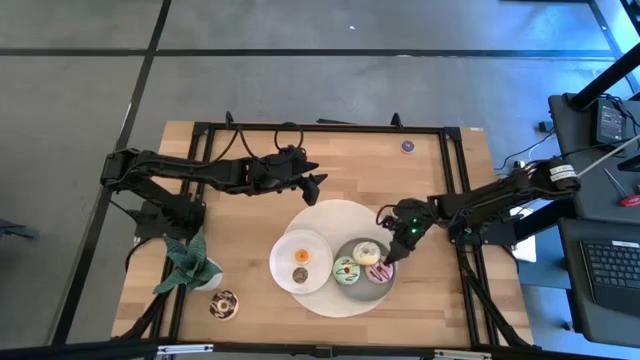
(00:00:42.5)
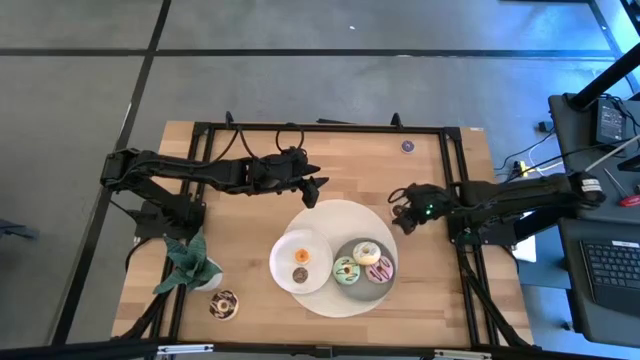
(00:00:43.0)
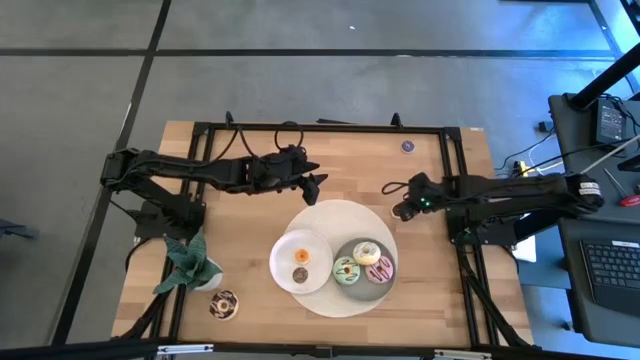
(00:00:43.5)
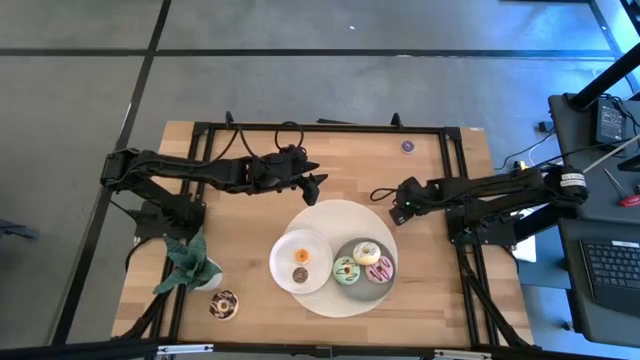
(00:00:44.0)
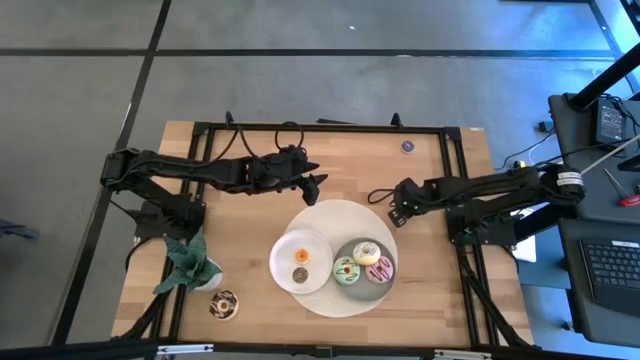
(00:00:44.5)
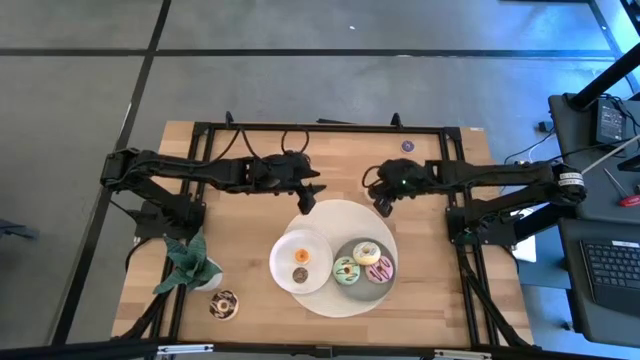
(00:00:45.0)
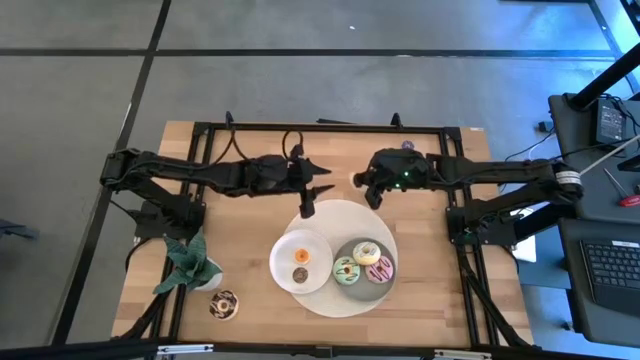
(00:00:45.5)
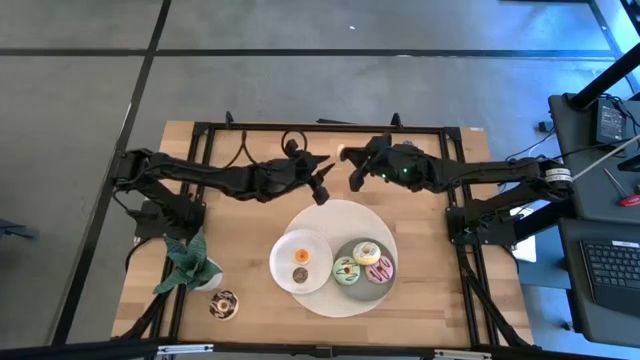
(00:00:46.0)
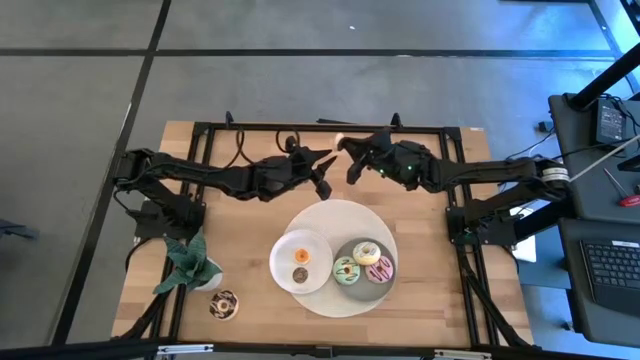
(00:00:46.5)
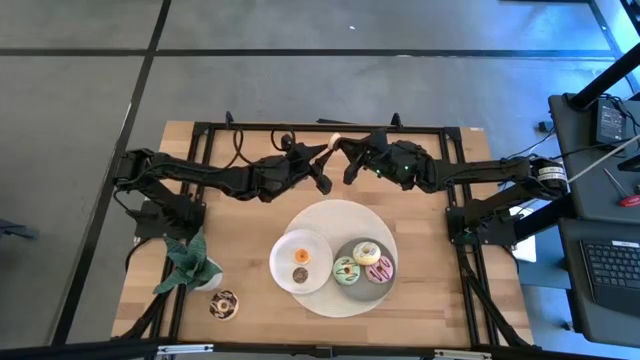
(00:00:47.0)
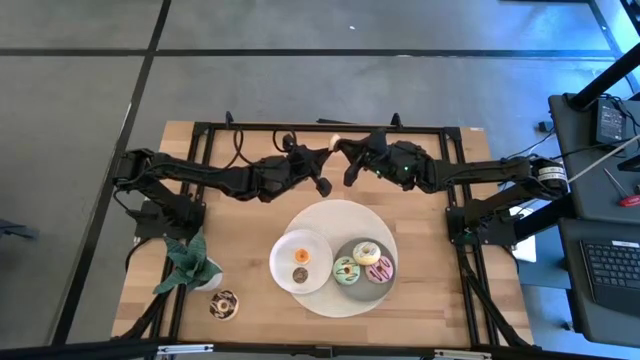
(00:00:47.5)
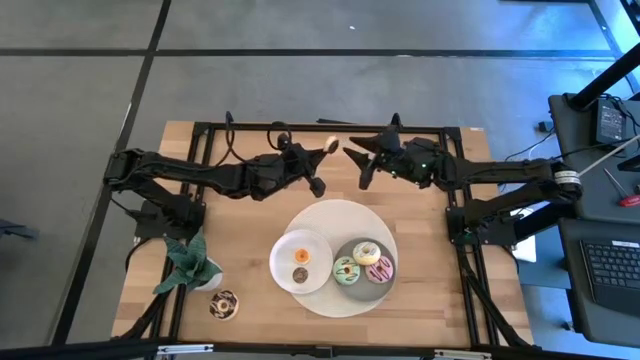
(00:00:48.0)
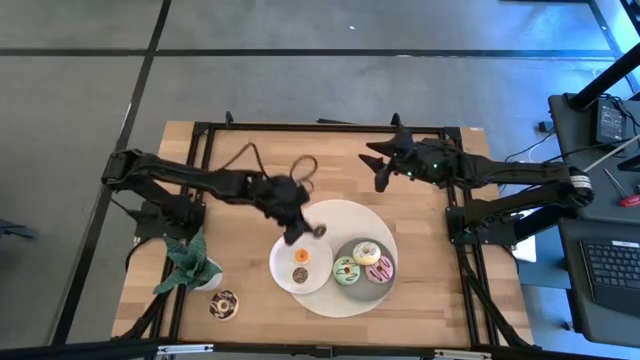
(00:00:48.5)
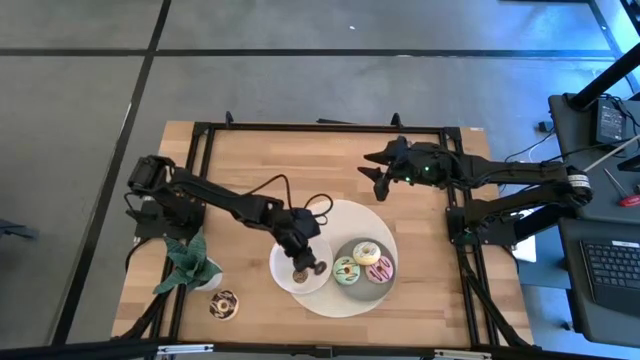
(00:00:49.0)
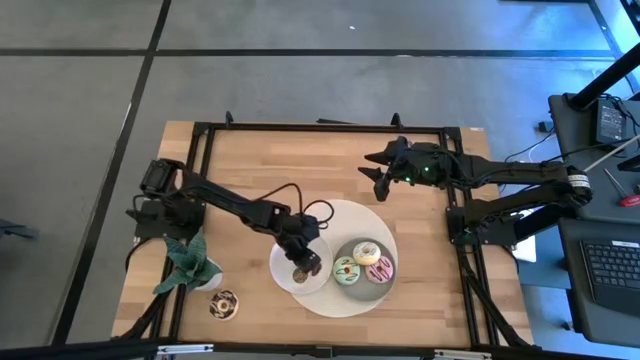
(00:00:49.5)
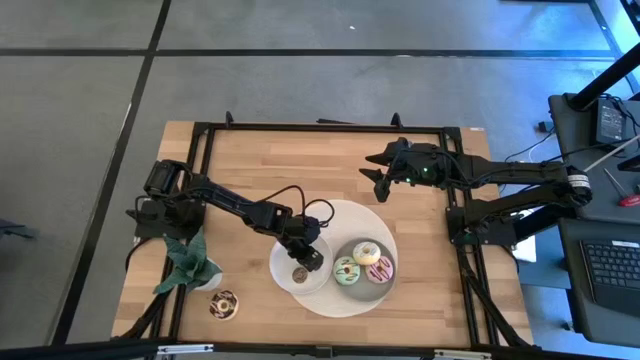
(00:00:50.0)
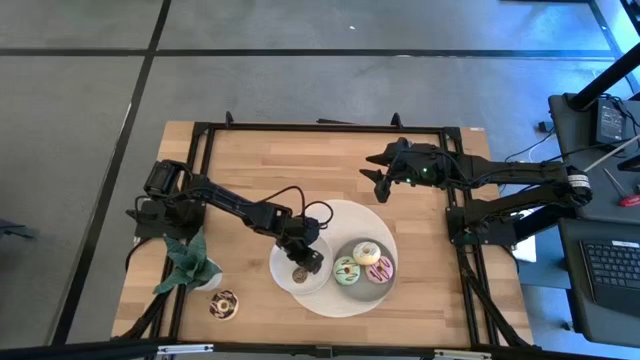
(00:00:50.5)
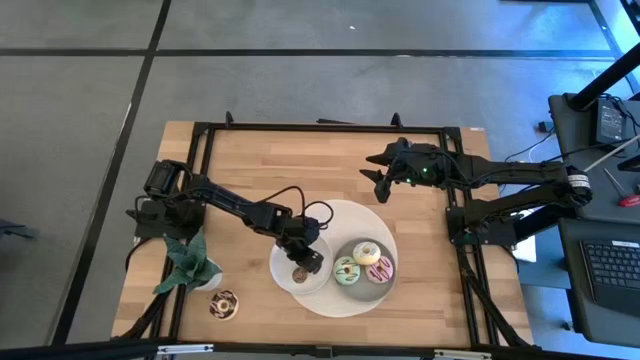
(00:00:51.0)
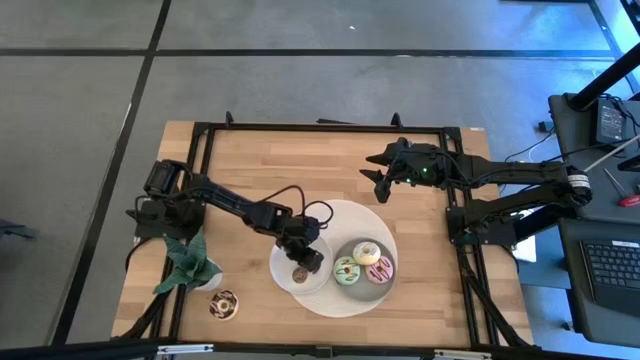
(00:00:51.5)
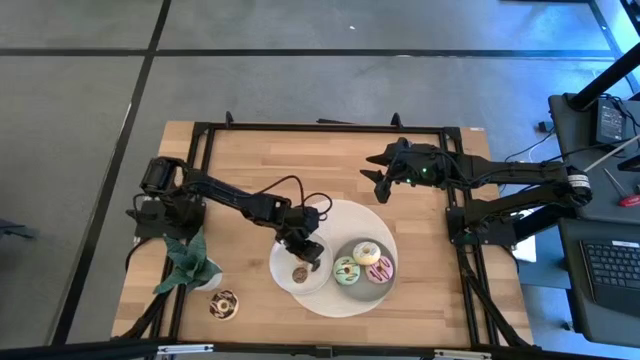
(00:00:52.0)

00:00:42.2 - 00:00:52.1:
Task: Pick & Place donuts
Put the small black donut on the white plate

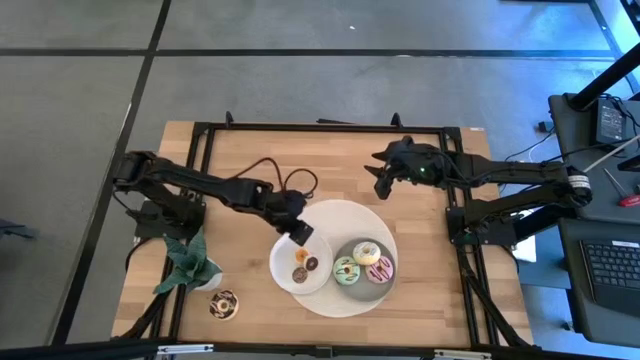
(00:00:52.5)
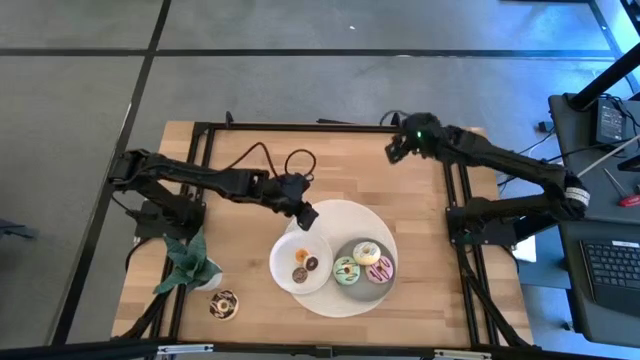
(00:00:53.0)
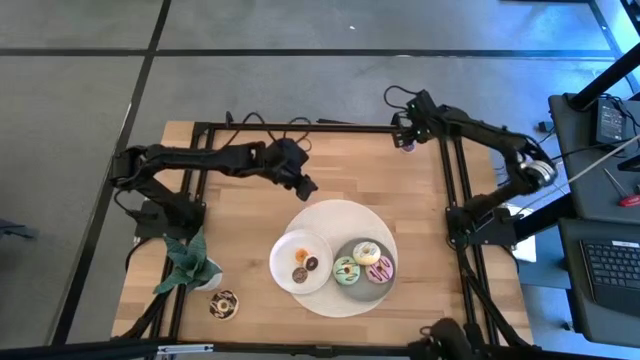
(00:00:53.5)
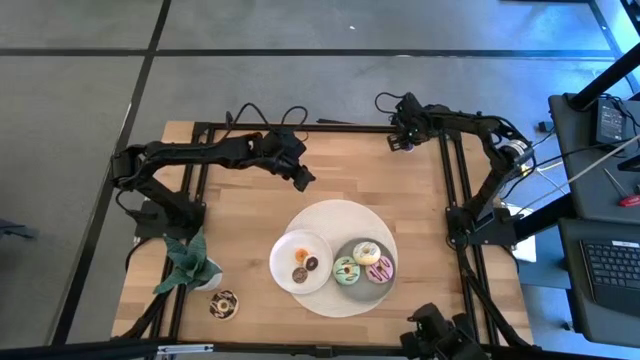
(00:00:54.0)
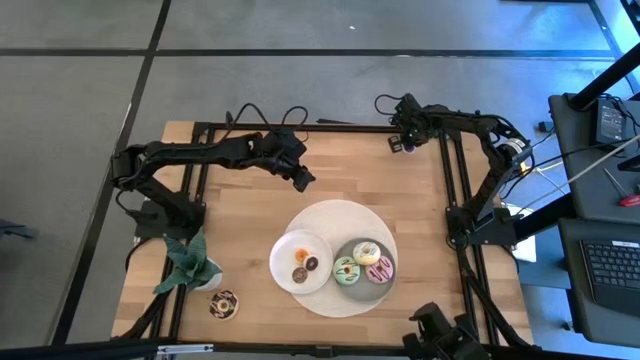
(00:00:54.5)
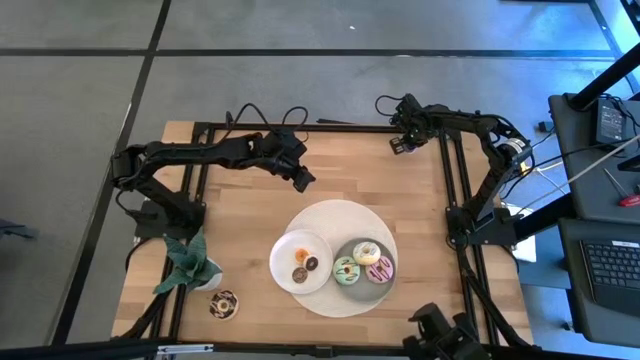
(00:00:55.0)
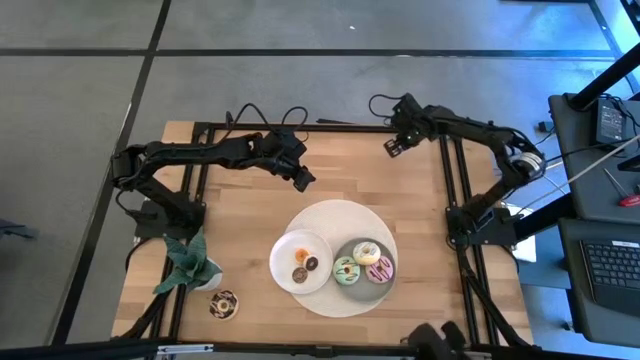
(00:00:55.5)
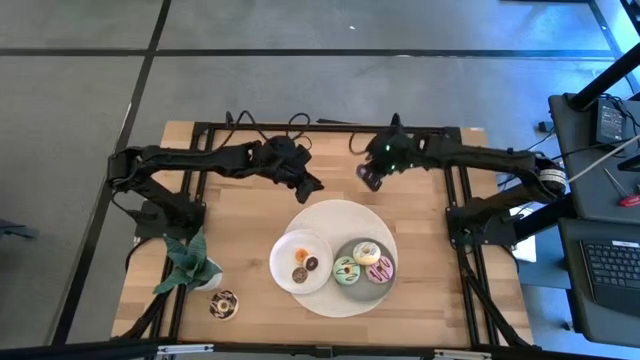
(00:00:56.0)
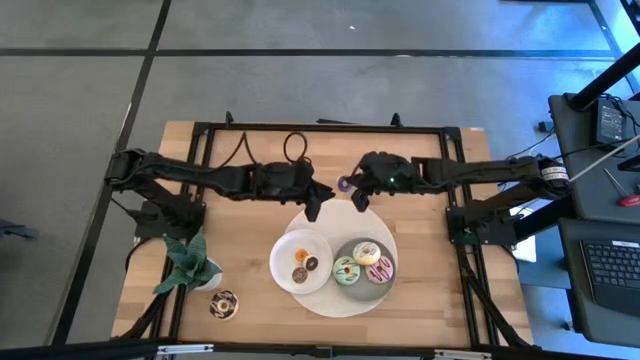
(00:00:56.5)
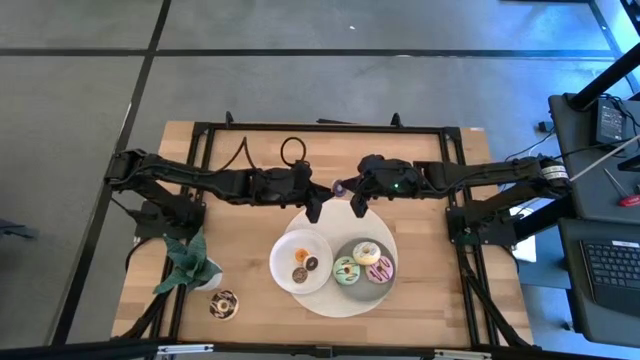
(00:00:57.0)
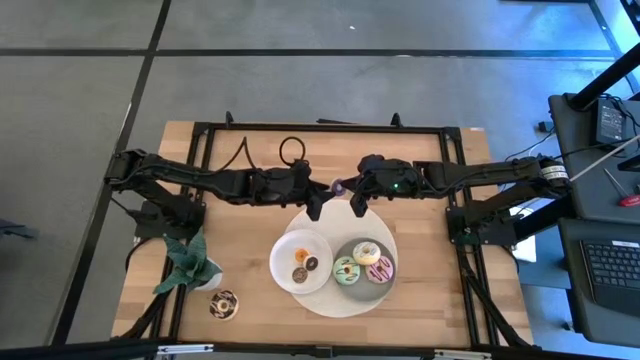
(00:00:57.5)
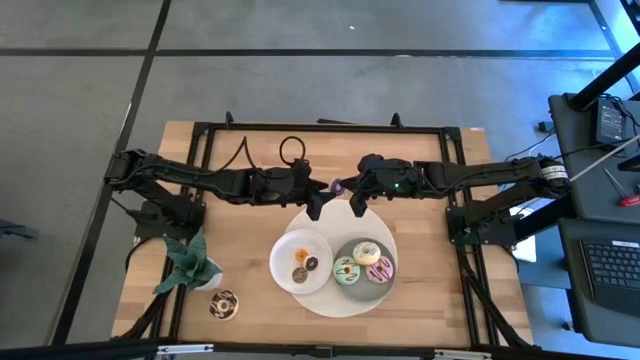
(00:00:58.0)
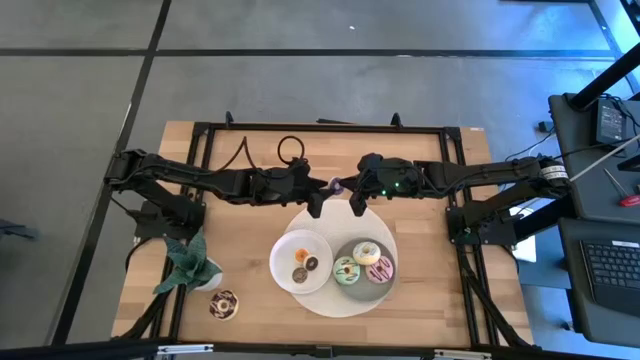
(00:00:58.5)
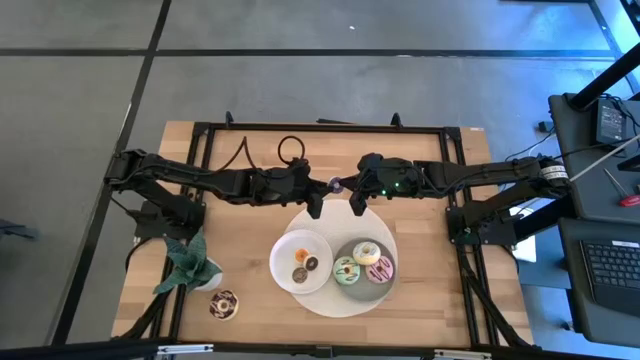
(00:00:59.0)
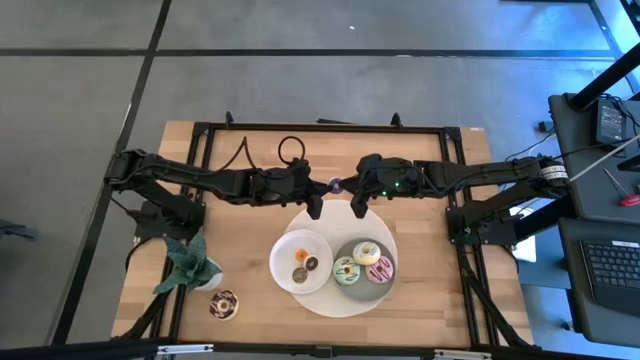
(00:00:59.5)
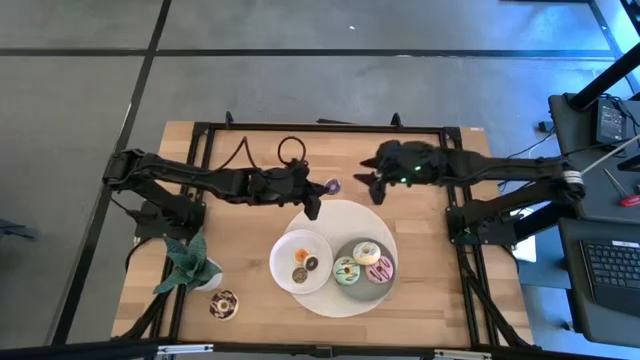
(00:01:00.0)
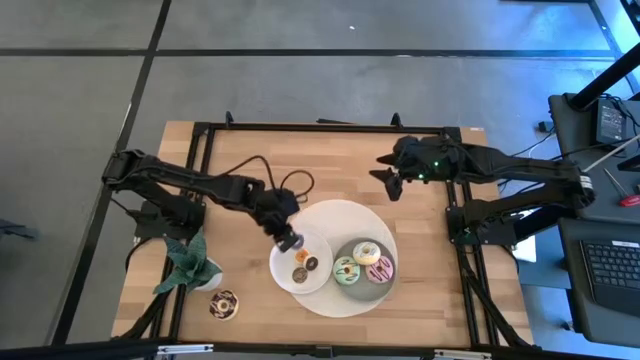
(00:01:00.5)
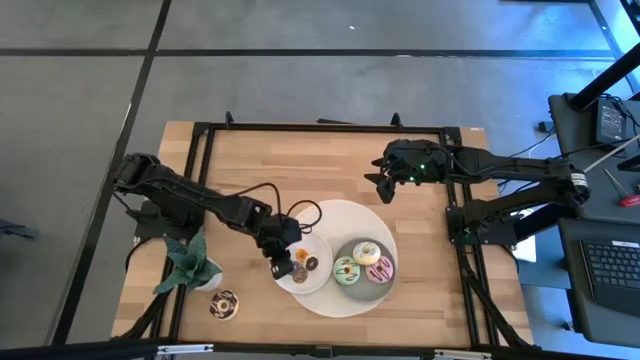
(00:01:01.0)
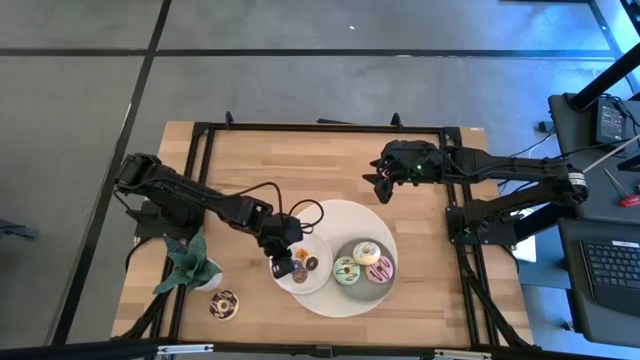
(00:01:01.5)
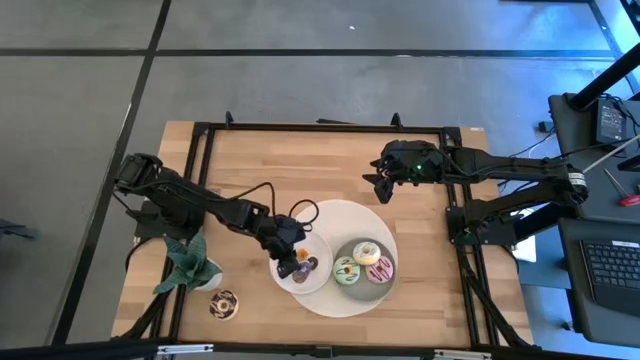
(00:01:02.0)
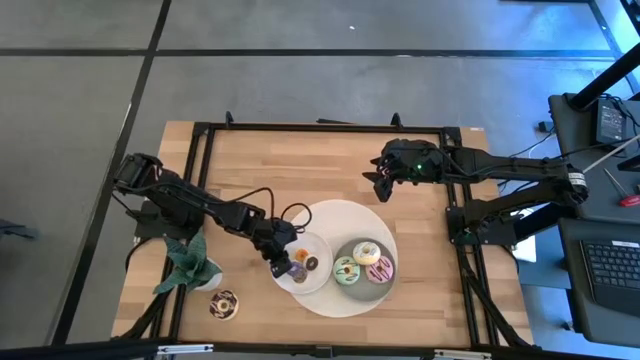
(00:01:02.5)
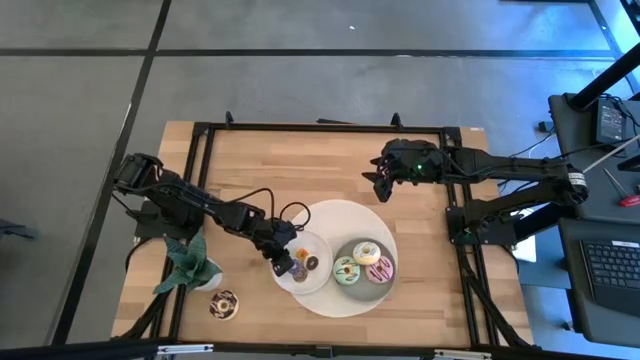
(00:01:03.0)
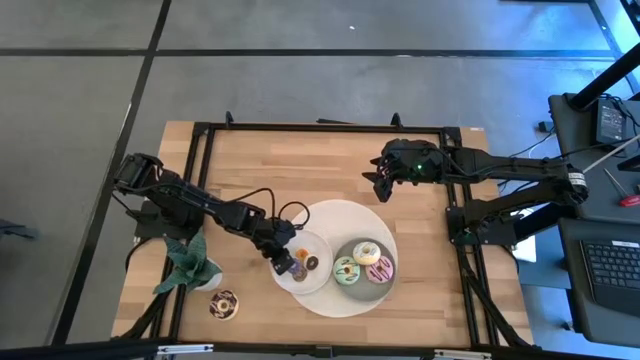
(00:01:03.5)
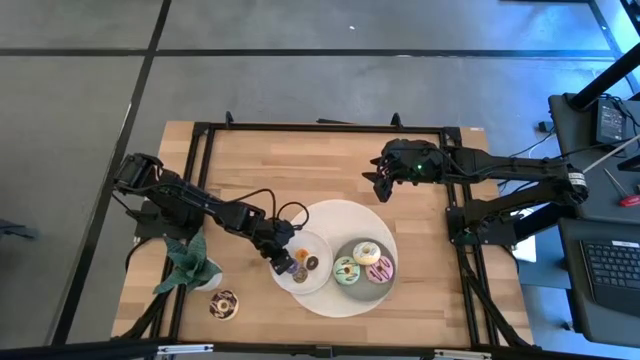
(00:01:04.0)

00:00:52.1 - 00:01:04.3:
Put the small blue donut on the white plate
